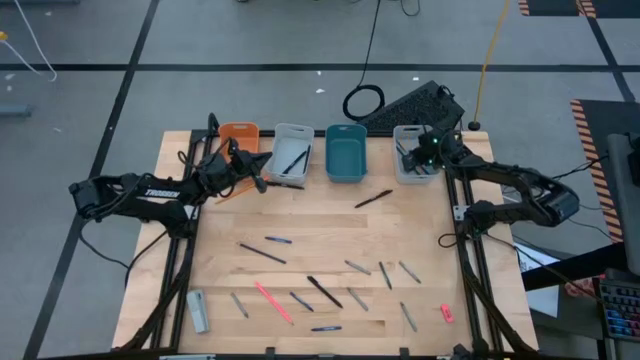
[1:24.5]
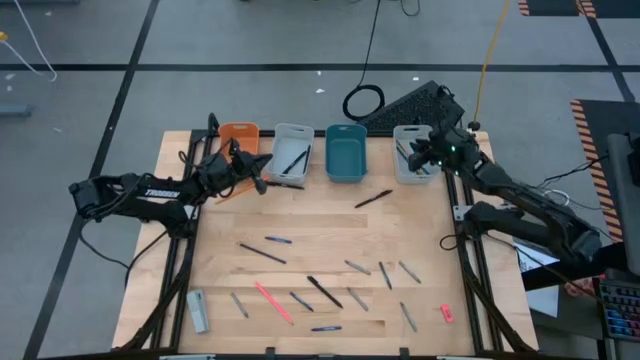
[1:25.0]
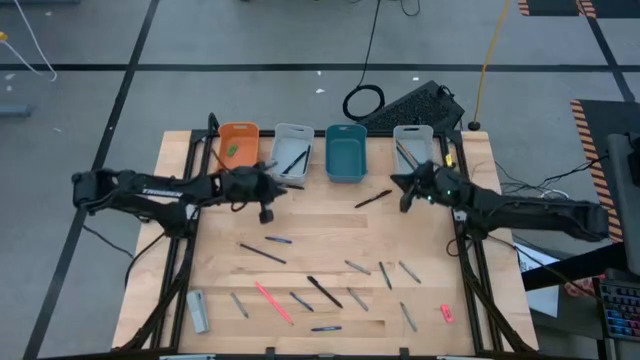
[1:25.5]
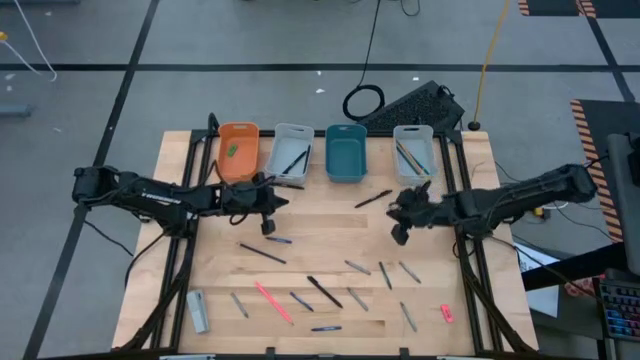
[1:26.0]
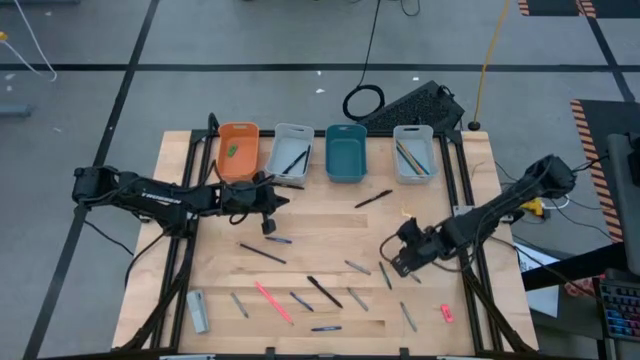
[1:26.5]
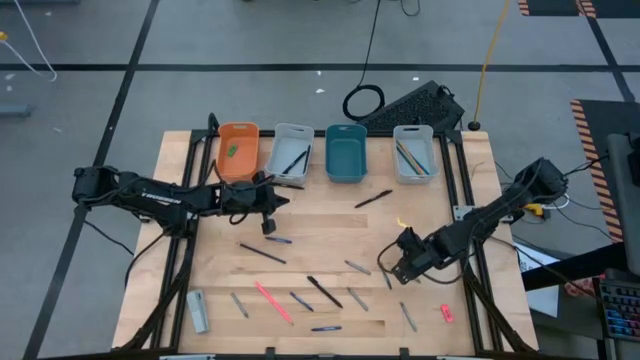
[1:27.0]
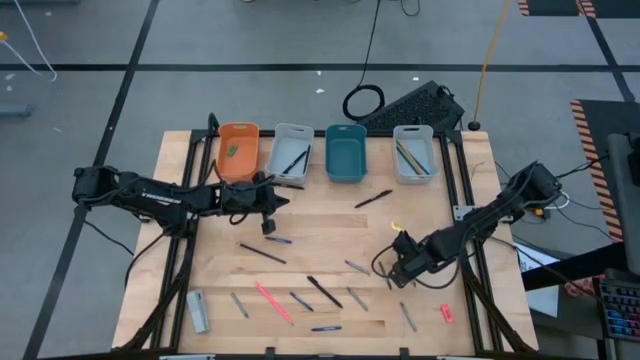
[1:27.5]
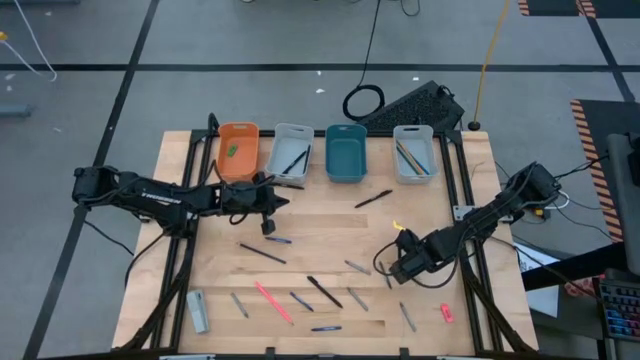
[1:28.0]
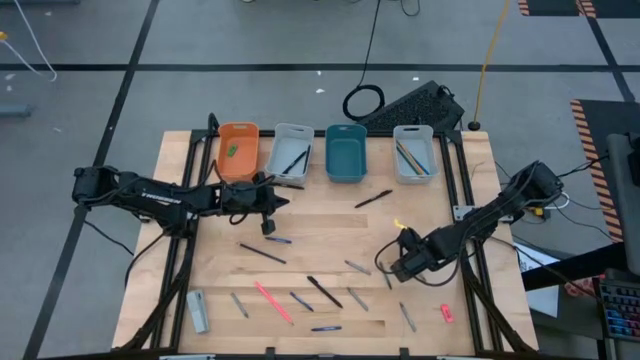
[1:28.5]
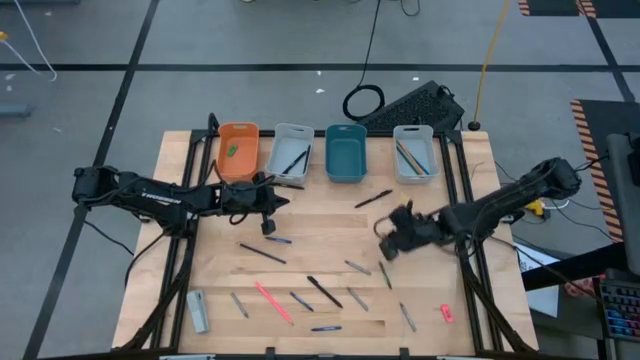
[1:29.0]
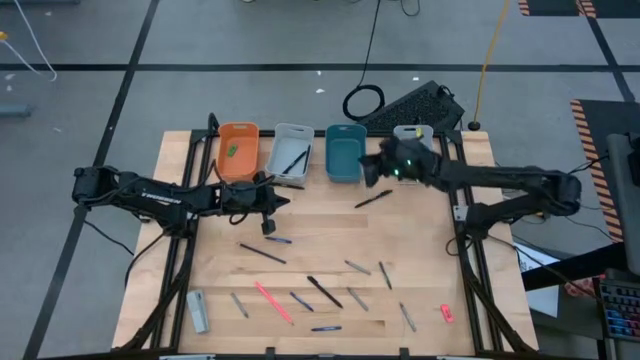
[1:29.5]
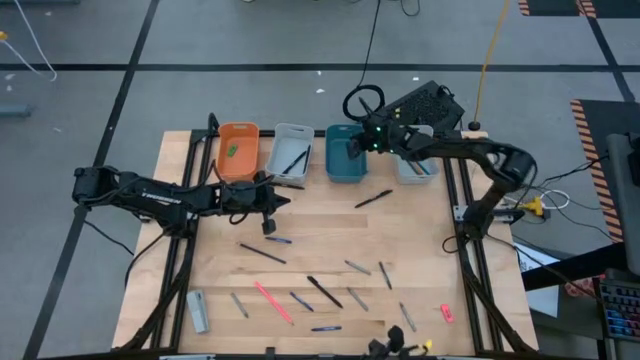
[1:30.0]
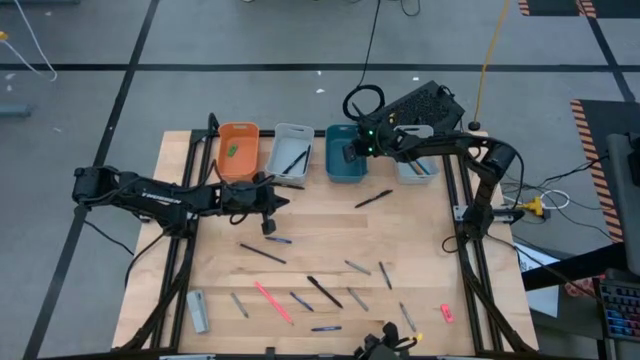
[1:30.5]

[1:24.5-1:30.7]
Task: Sort crayons/erasers/pens/pencils in bins
Put the gray crayon into the blue bin

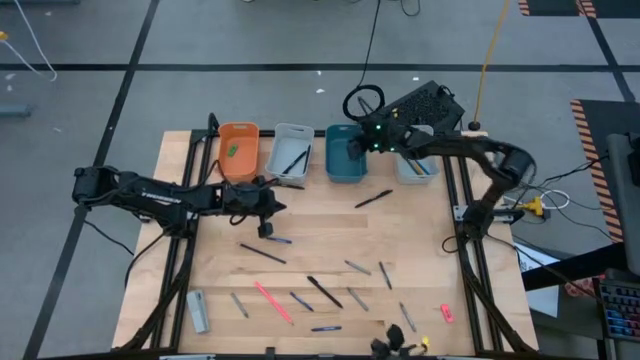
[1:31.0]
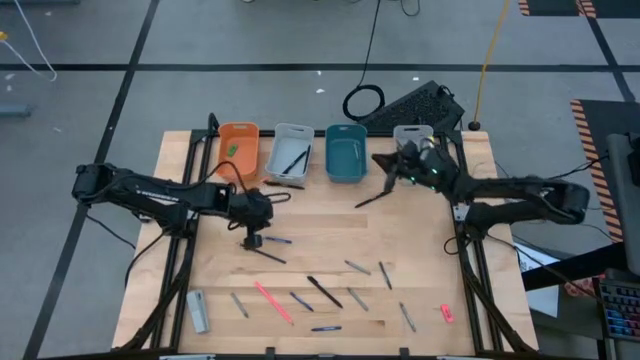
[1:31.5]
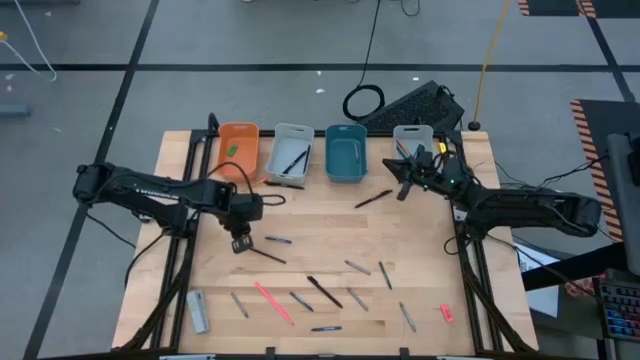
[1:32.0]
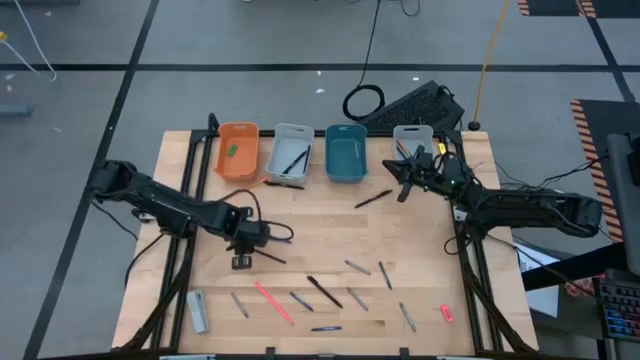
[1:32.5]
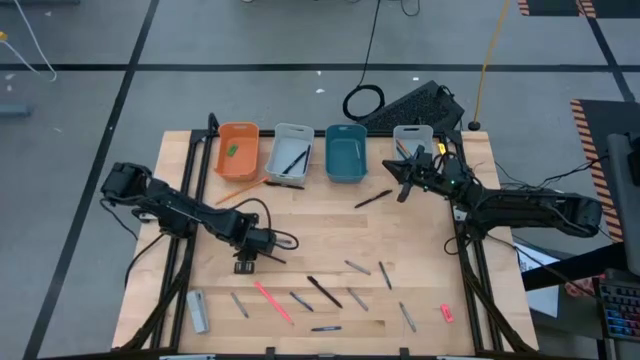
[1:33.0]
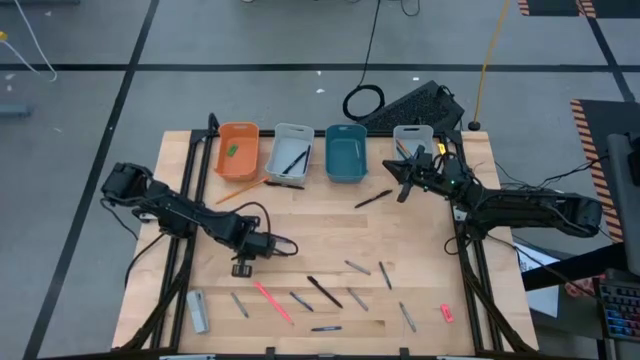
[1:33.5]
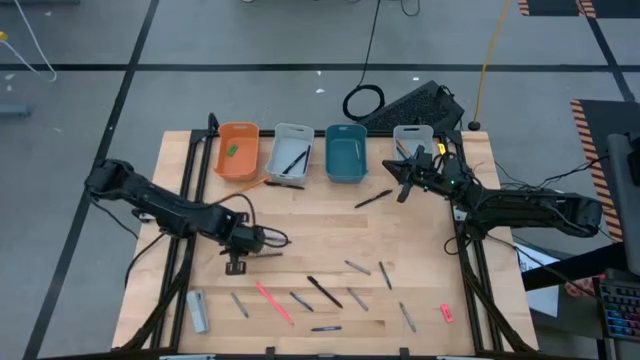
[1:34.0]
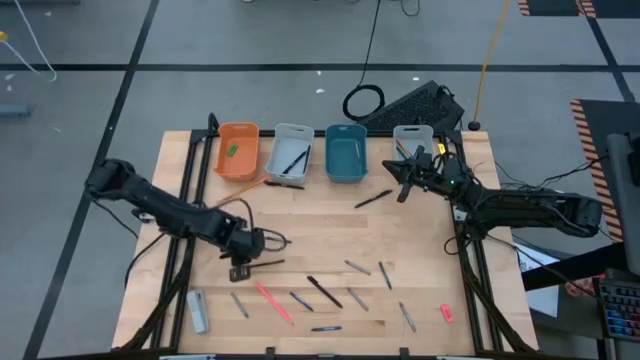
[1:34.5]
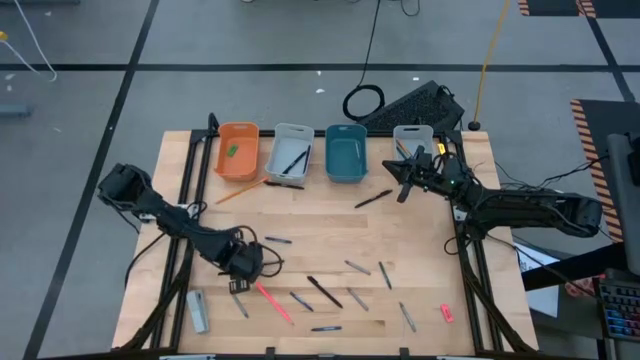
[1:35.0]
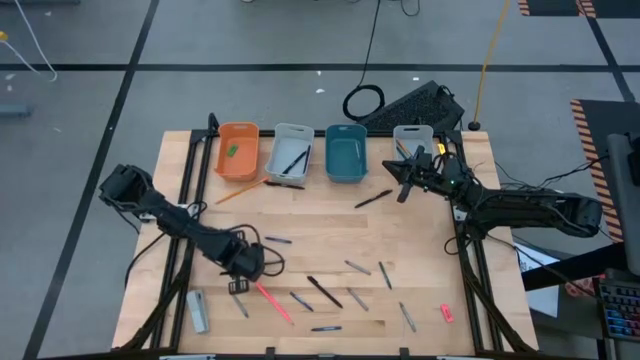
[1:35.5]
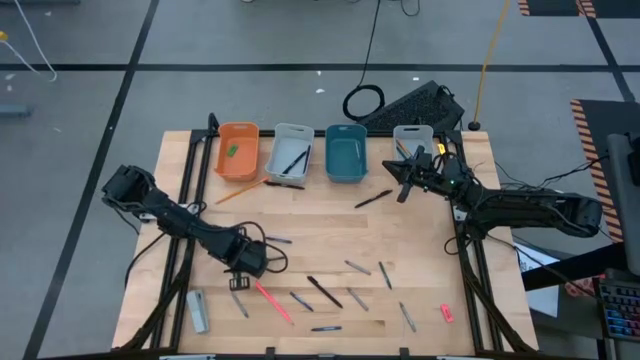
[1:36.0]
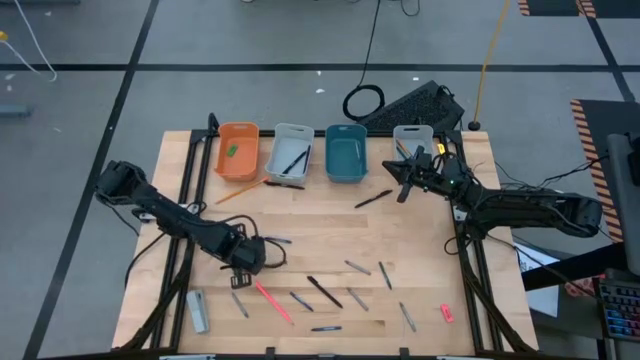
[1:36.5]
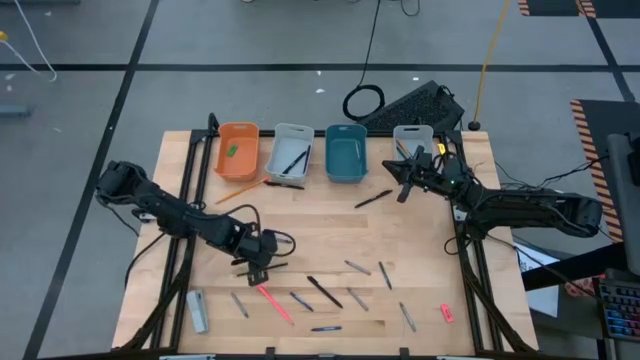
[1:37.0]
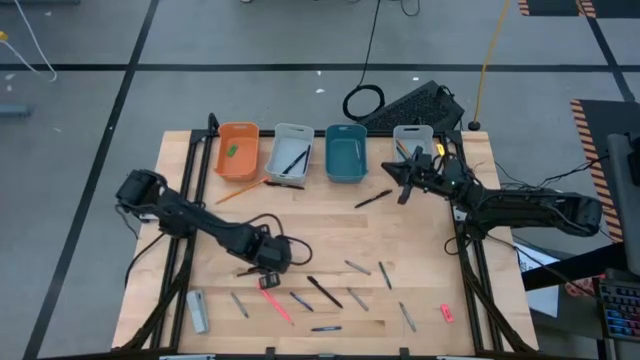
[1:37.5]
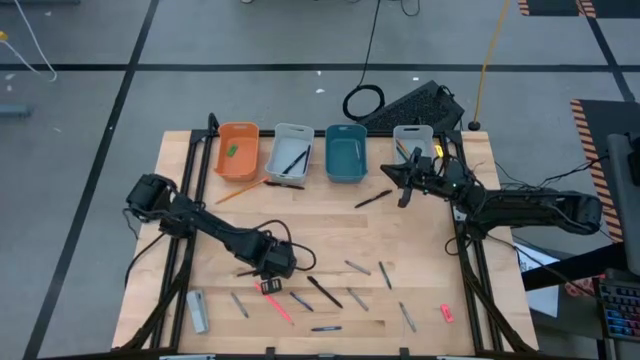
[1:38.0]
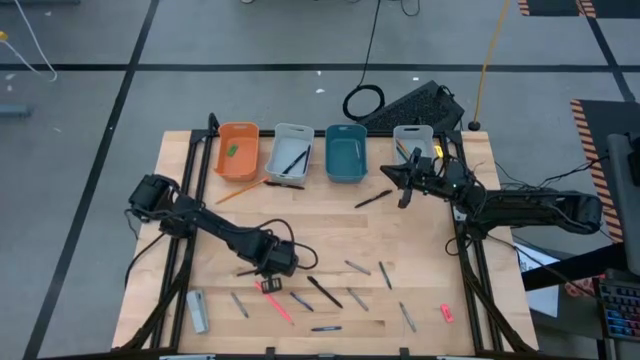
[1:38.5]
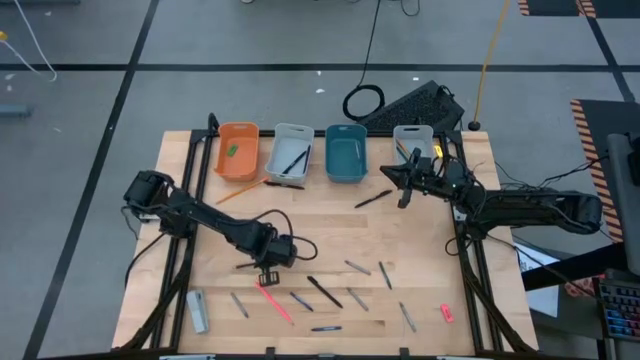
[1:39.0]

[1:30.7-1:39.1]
Put the dark blue colored pencil into the right gray bin
